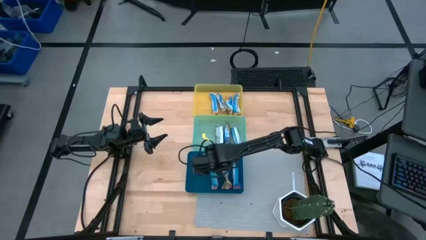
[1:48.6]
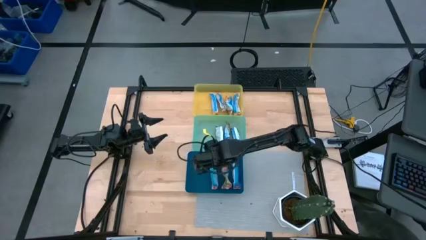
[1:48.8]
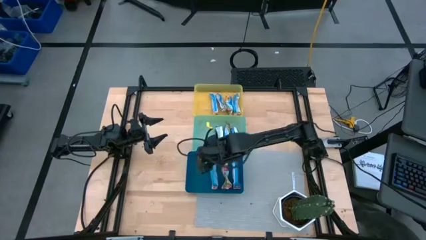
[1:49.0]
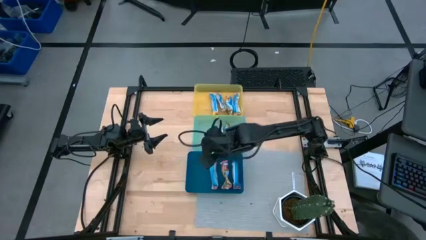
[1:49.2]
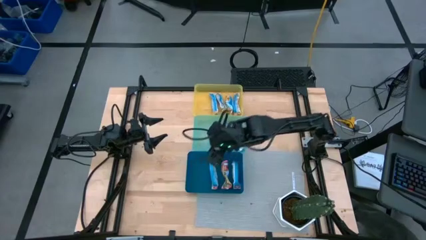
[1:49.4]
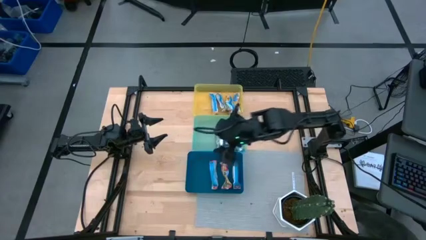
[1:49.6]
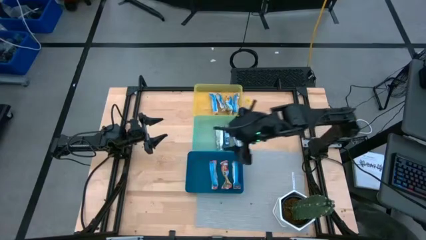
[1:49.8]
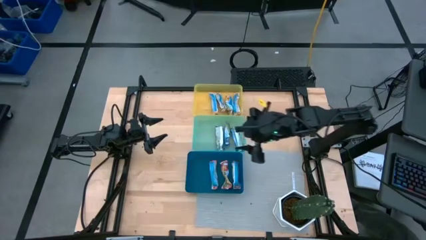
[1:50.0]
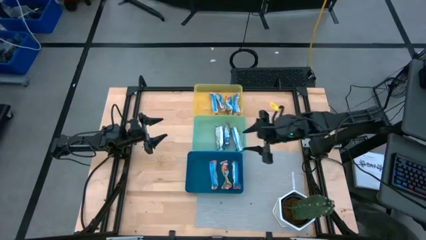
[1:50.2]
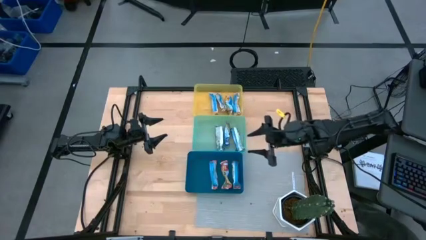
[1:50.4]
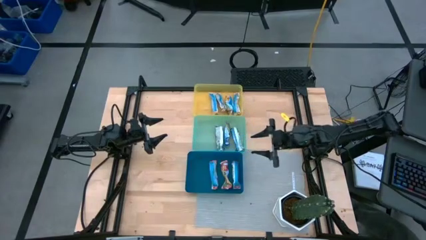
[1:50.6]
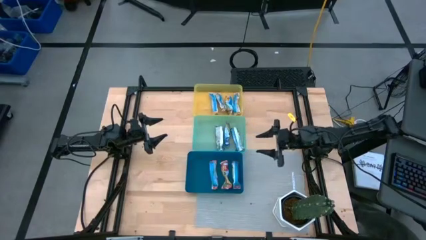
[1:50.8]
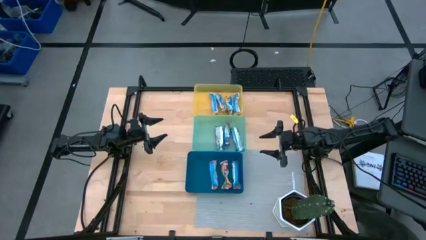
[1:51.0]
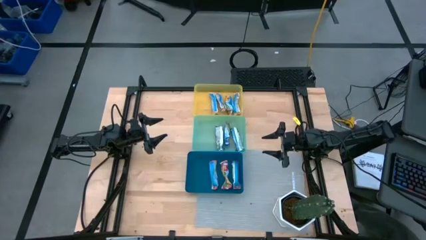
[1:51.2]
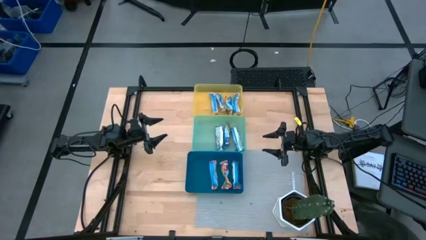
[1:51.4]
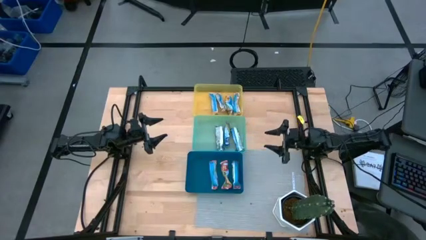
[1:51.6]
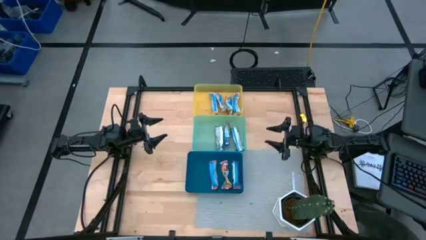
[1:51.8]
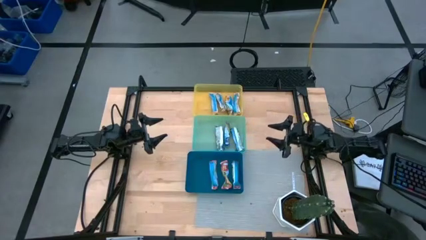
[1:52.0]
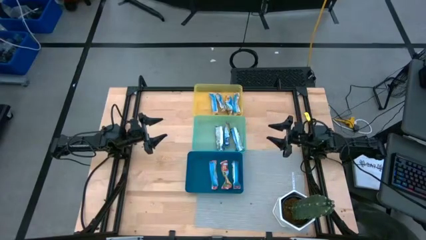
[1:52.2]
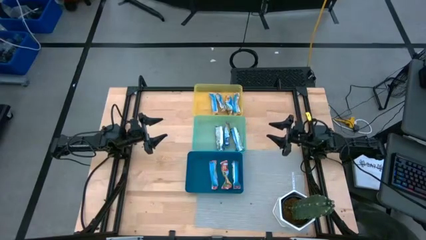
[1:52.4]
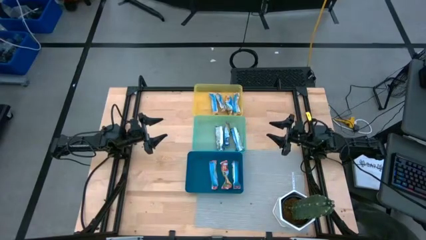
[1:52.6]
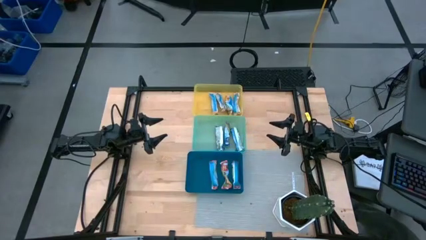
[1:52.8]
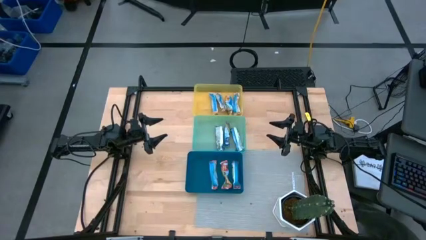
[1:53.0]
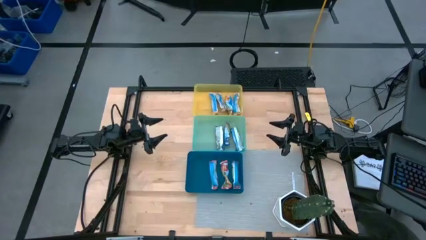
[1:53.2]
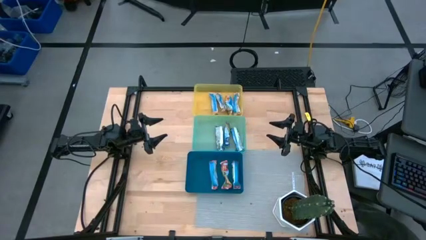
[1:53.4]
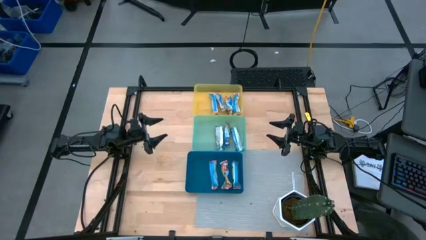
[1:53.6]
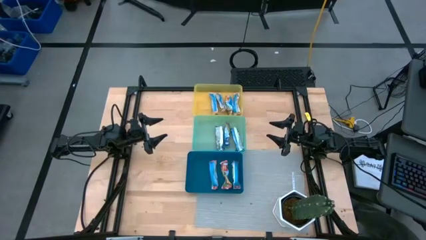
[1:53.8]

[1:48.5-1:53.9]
Task: Pick and place Granola Bars by type
Return to Home Position

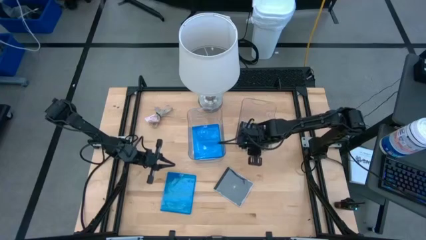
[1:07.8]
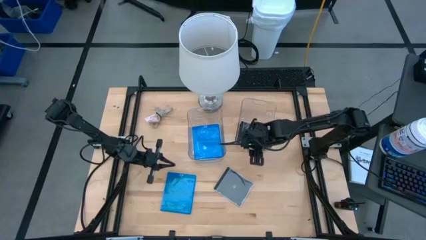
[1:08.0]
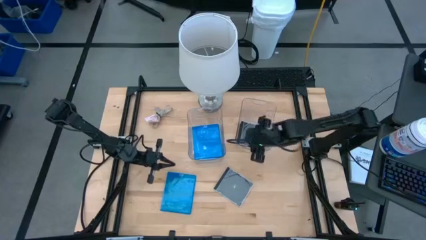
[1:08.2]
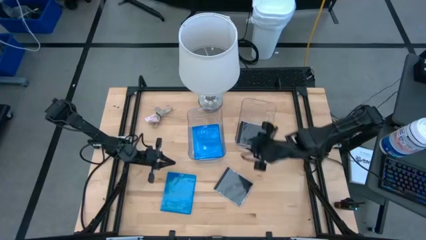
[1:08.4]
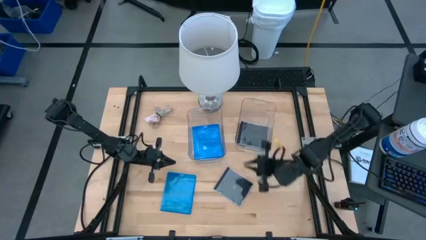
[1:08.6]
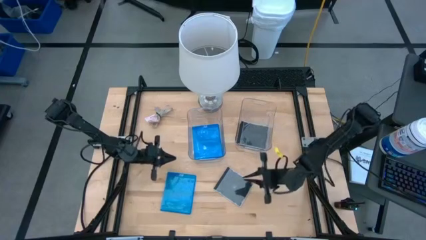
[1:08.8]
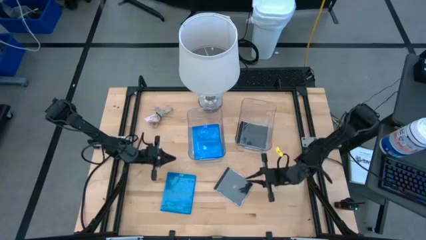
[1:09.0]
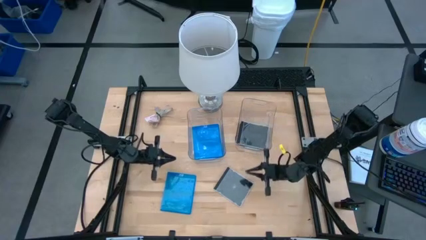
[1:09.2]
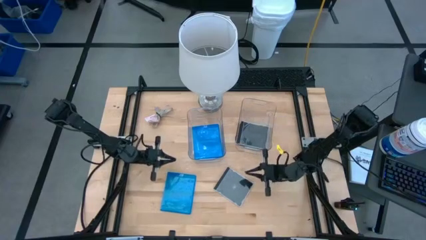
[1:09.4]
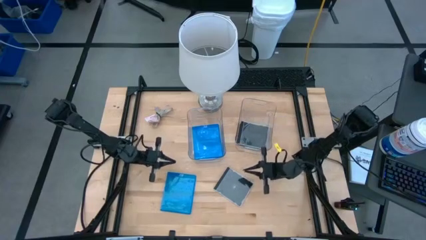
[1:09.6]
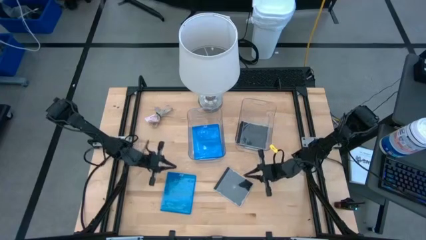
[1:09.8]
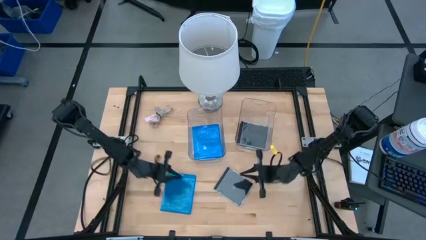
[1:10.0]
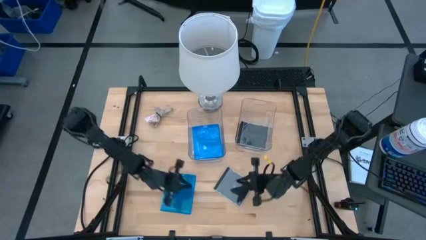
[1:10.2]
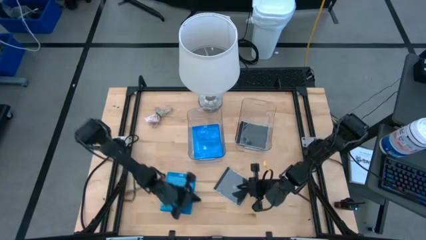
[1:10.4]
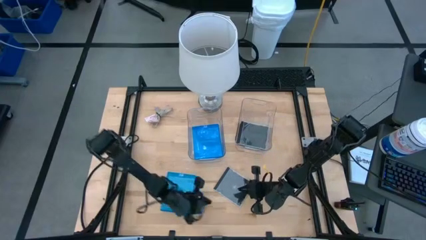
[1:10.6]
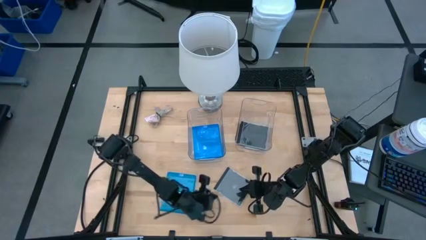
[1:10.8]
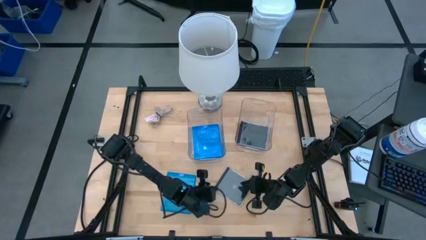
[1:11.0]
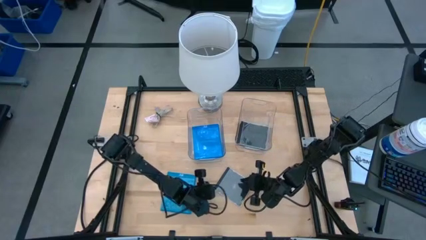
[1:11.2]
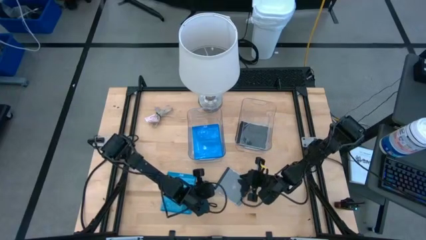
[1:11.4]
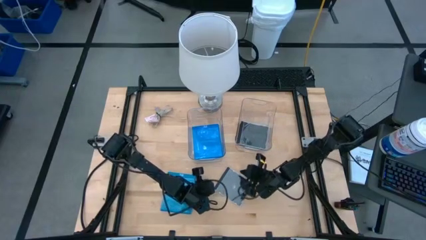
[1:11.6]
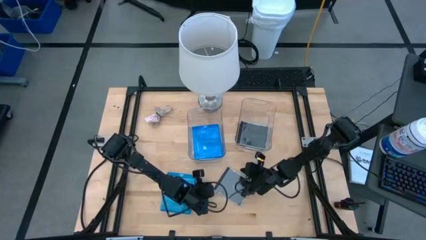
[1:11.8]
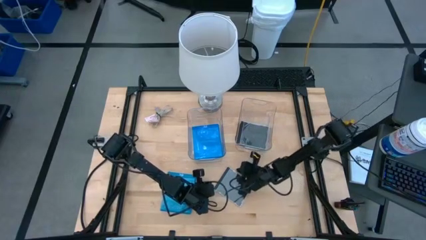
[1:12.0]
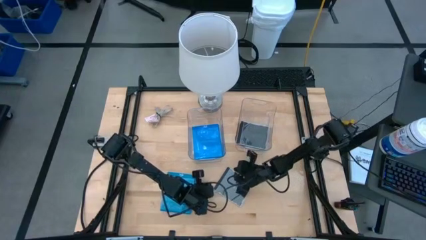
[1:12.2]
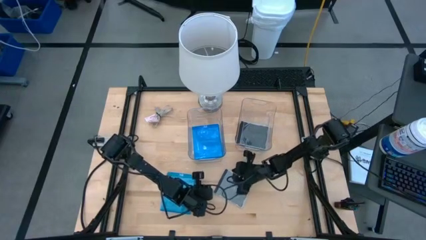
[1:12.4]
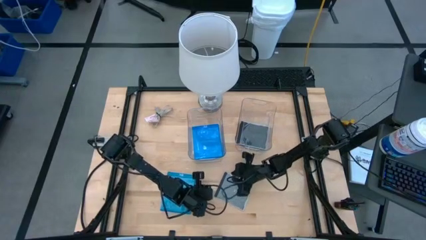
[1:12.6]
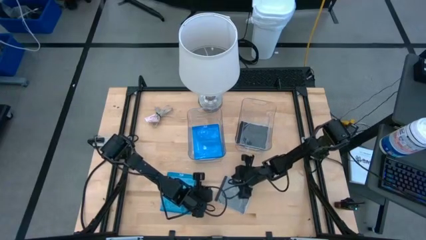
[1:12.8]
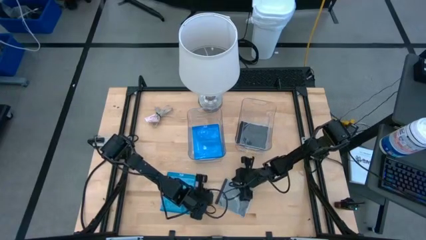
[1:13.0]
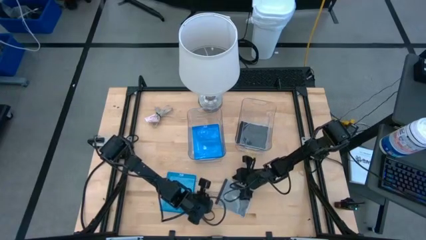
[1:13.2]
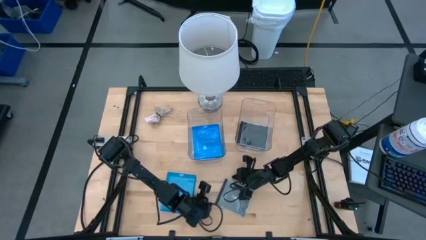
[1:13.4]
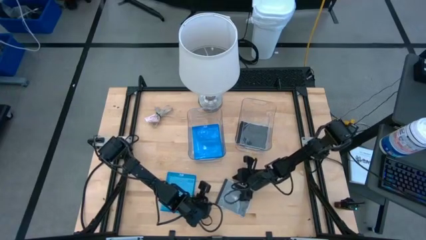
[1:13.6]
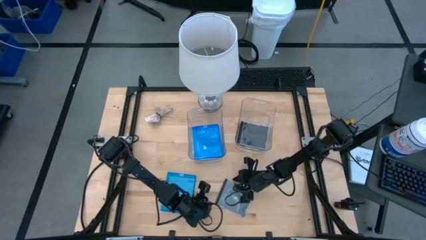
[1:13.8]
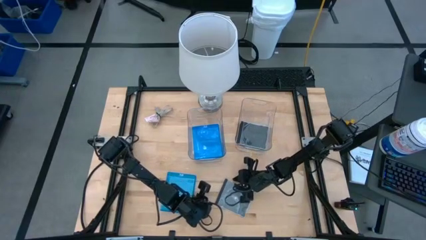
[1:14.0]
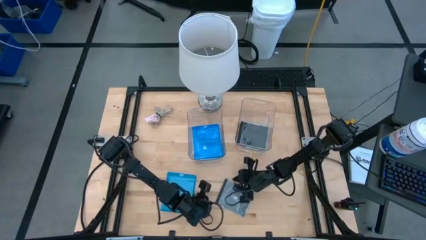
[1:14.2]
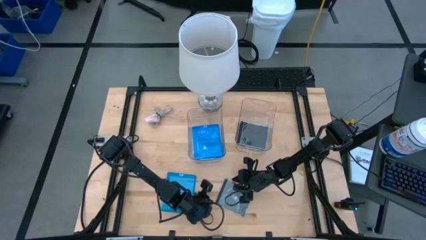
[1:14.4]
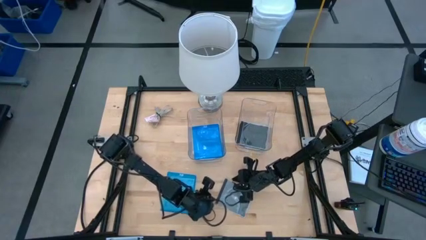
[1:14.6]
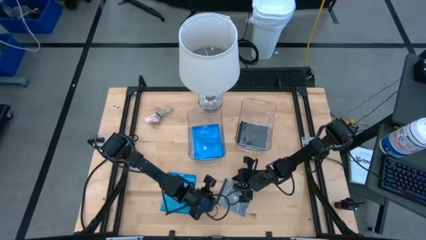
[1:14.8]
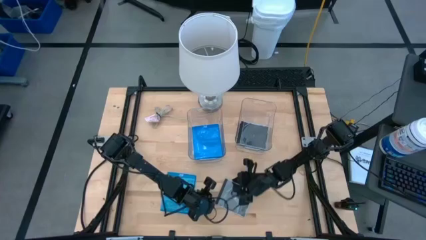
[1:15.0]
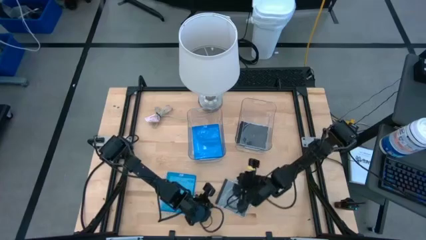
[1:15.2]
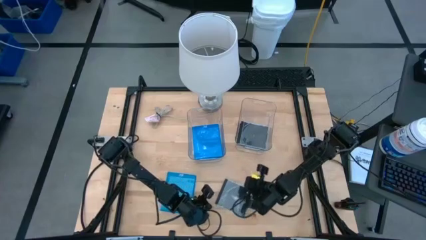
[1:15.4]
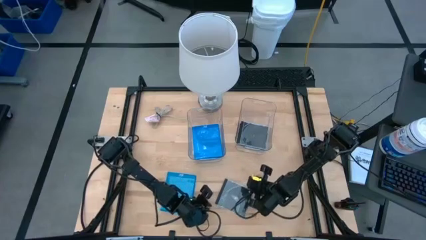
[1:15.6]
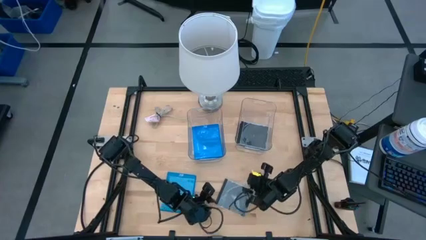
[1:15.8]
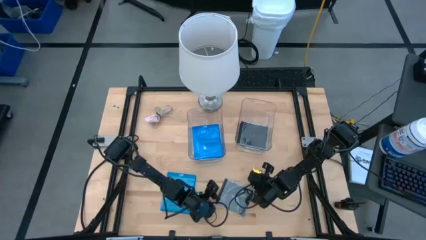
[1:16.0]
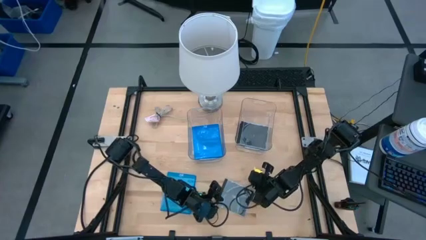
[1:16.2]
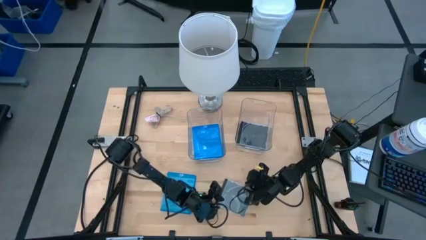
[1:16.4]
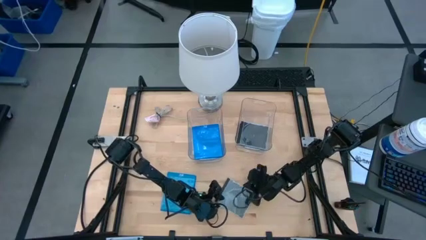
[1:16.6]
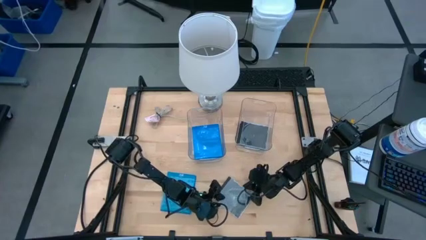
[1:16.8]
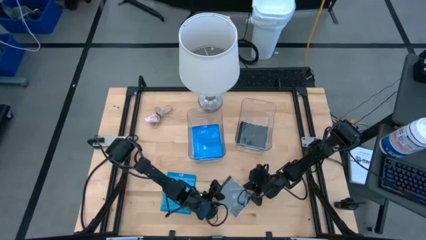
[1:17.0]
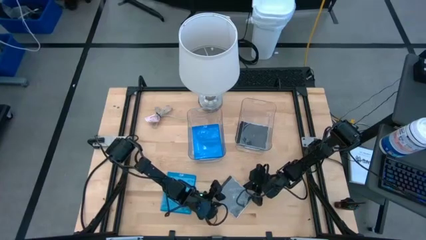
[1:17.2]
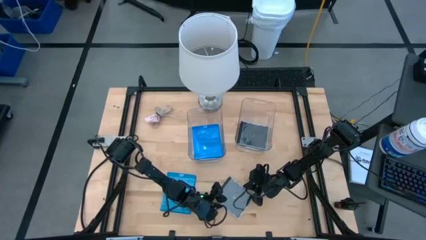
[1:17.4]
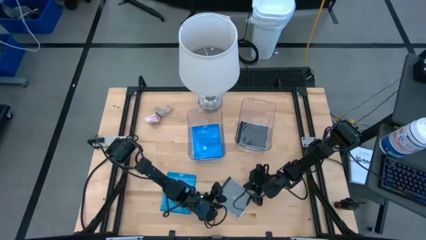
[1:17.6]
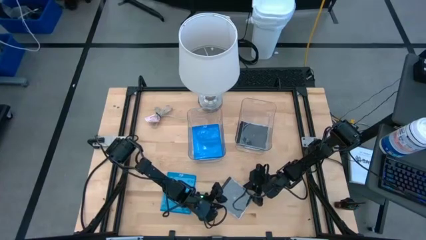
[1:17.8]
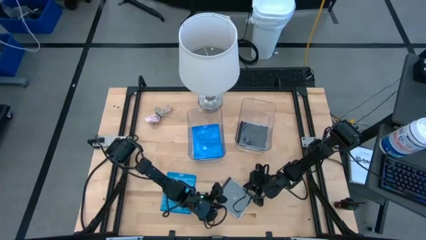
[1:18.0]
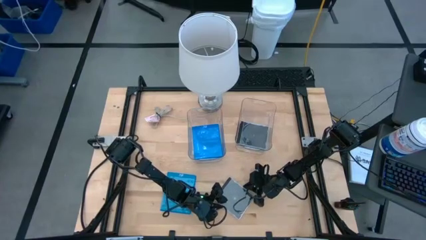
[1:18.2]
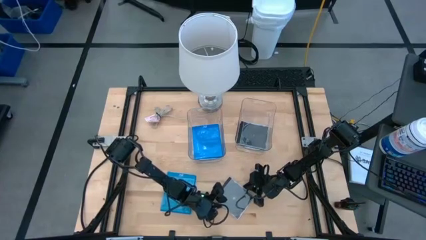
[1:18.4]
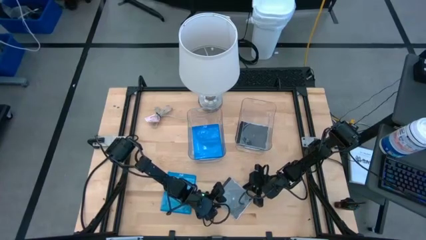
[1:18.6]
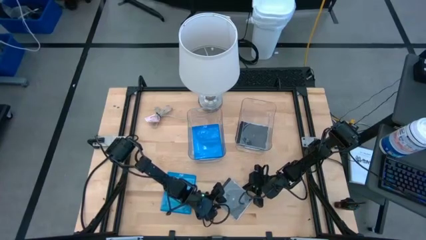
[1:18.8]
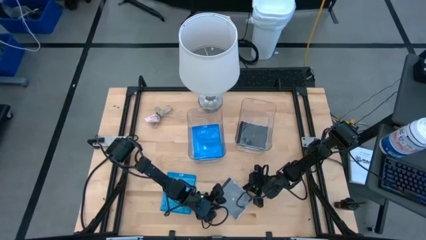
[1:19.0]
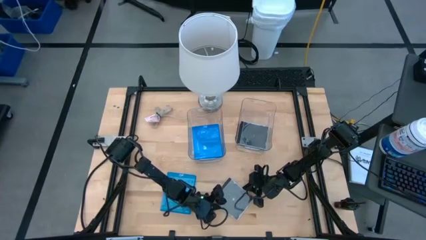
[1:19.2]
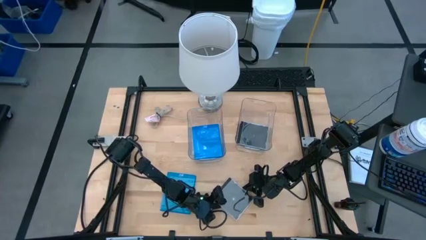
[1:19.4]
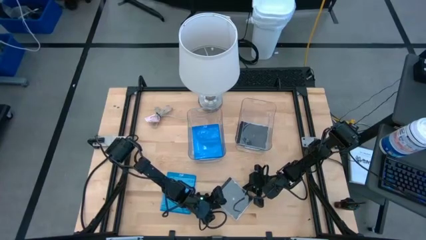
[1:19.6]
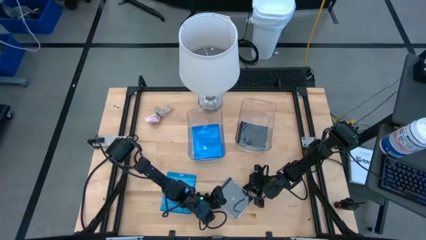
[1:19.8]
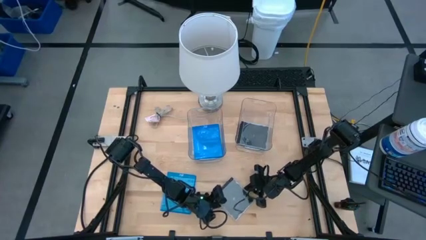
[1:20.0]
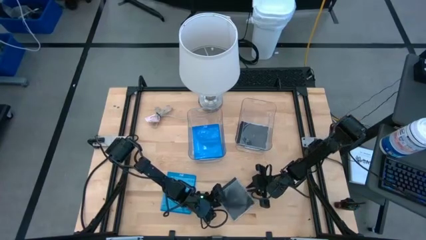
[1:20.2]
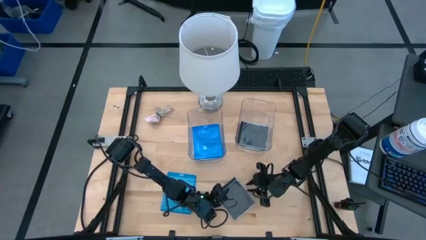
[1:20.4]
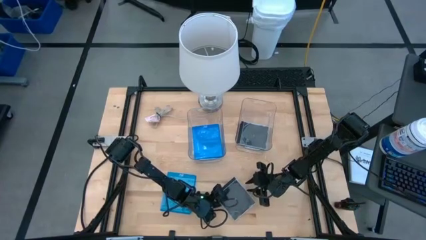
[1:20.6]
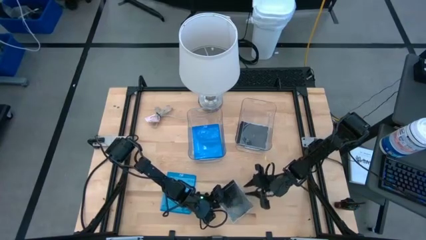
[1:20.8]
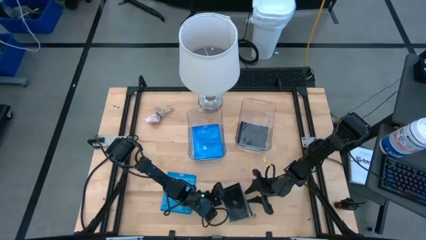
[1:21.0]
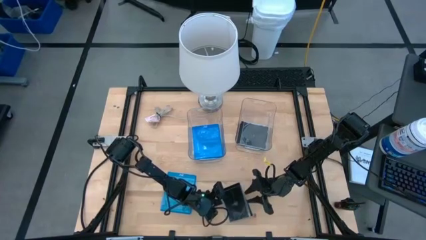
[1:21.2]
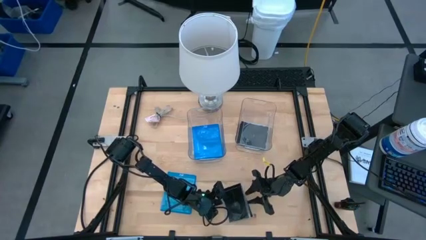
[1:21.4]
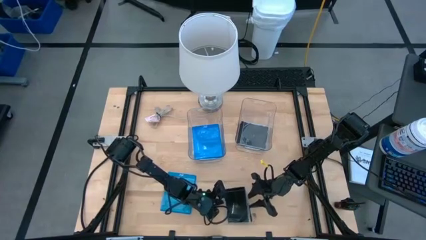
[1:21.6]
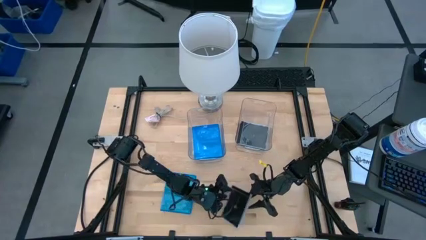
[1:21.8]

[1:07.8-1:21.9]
Task: Pick & place jewel cases by type
Put the black cd case into the right transparent bin
